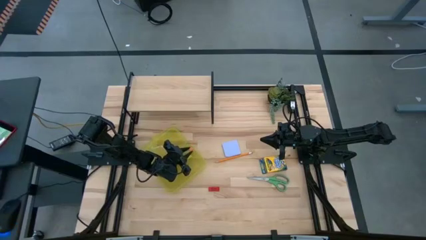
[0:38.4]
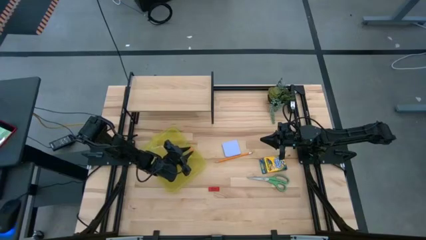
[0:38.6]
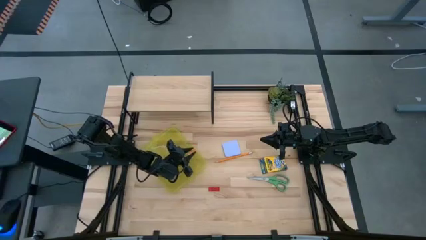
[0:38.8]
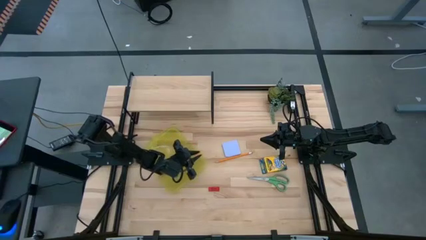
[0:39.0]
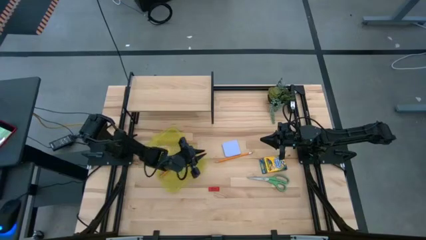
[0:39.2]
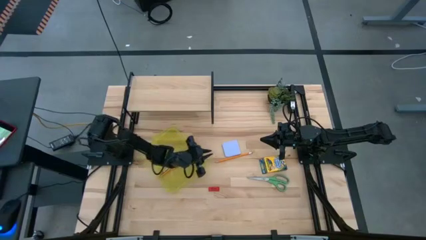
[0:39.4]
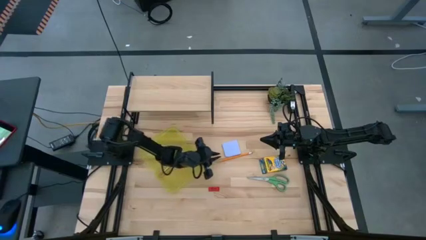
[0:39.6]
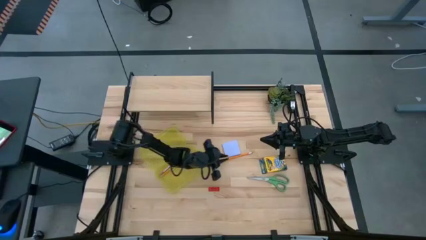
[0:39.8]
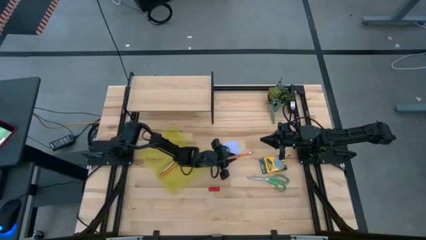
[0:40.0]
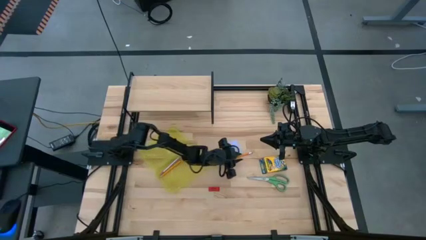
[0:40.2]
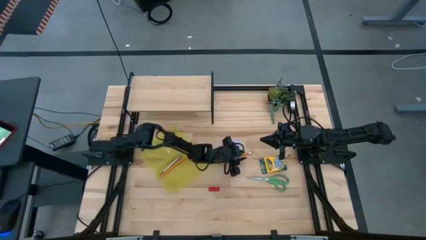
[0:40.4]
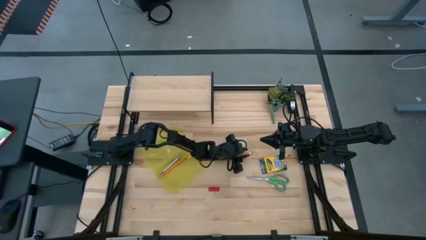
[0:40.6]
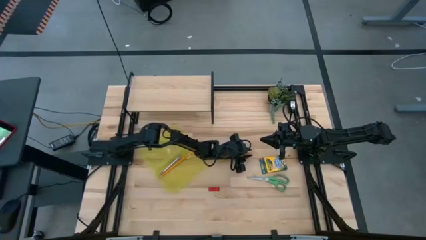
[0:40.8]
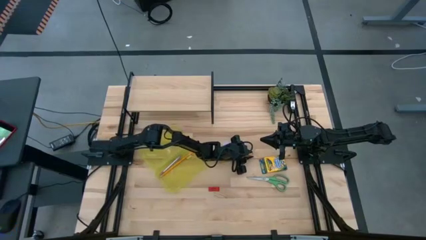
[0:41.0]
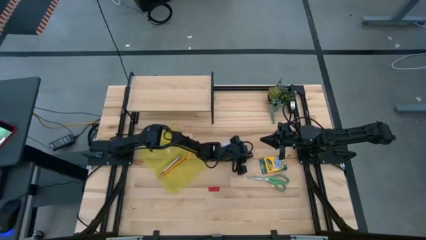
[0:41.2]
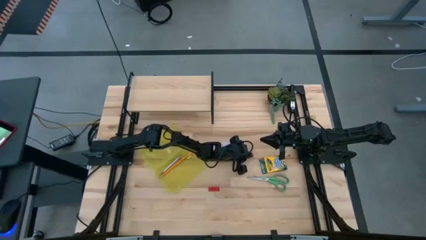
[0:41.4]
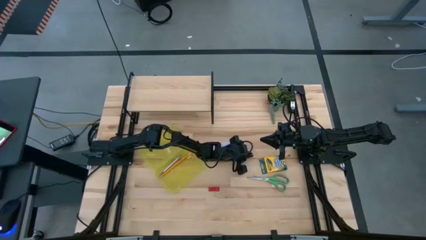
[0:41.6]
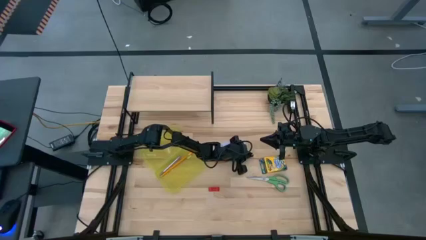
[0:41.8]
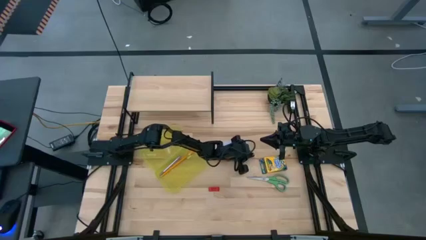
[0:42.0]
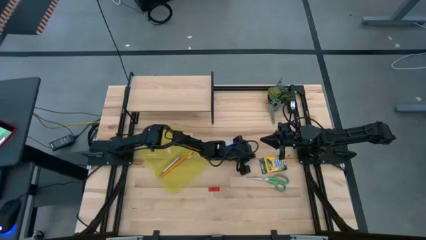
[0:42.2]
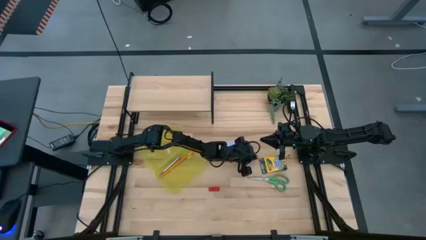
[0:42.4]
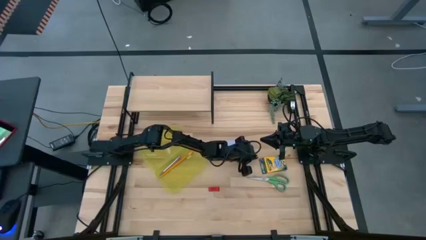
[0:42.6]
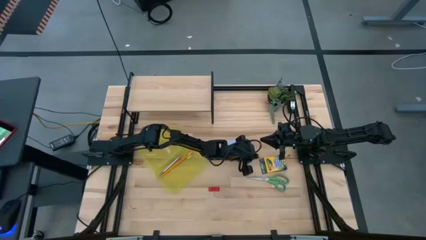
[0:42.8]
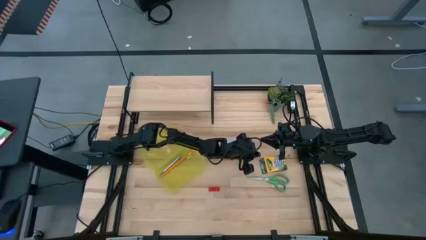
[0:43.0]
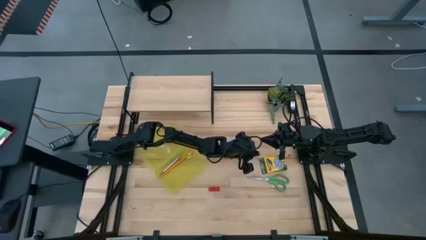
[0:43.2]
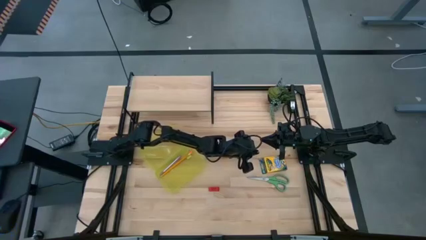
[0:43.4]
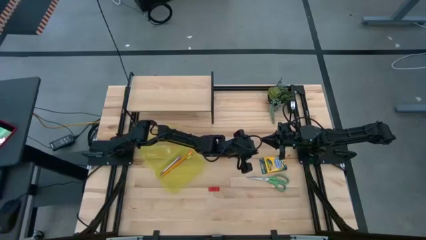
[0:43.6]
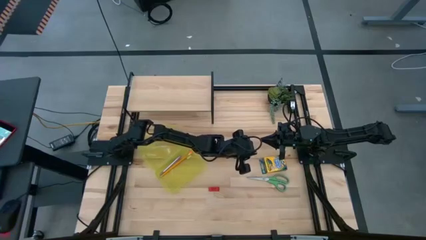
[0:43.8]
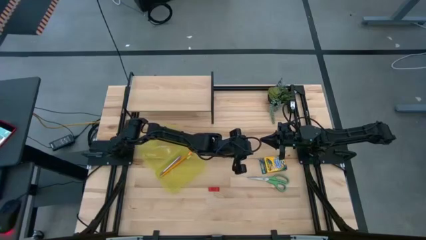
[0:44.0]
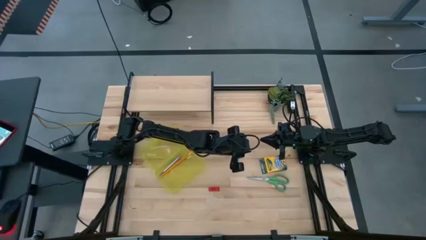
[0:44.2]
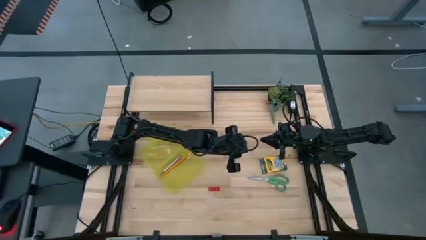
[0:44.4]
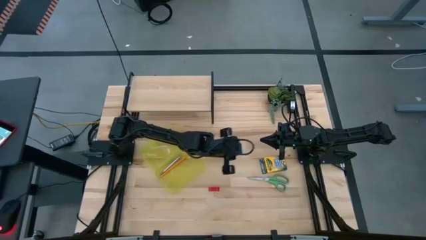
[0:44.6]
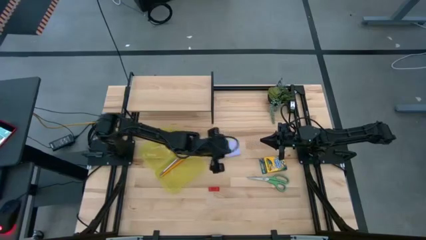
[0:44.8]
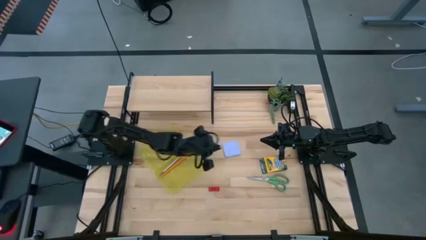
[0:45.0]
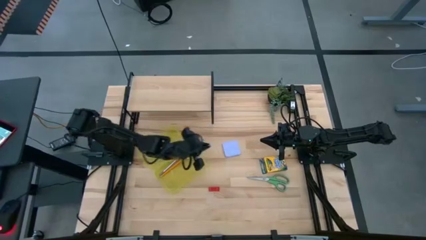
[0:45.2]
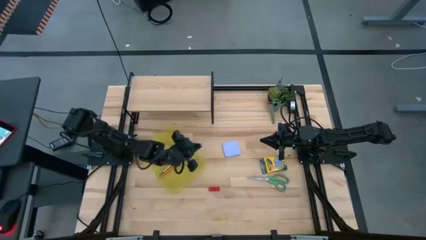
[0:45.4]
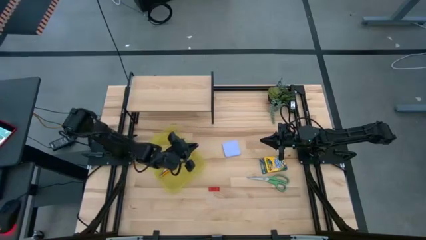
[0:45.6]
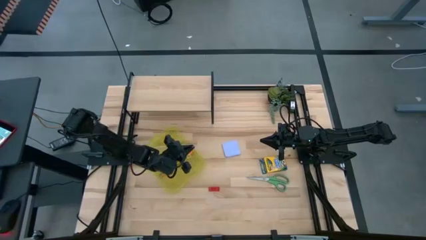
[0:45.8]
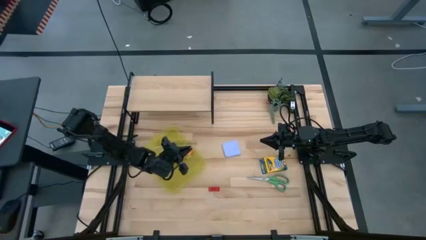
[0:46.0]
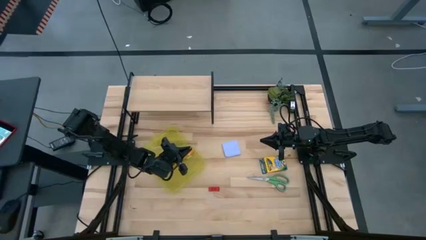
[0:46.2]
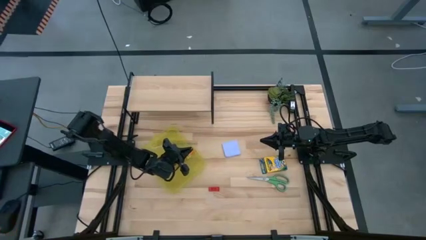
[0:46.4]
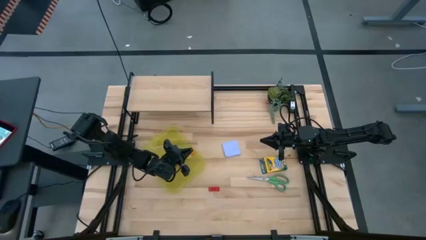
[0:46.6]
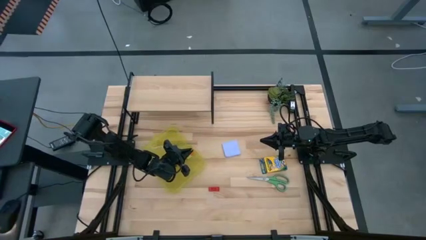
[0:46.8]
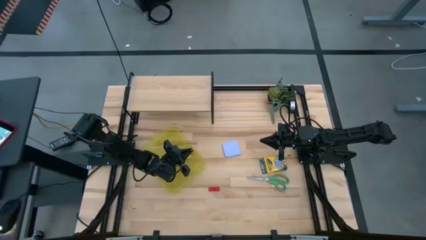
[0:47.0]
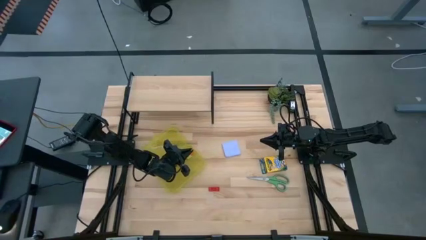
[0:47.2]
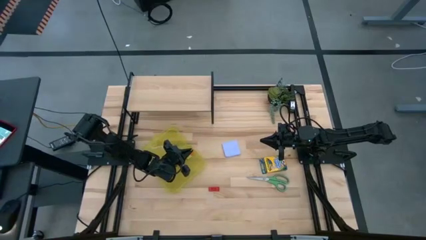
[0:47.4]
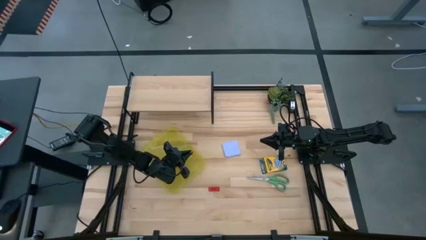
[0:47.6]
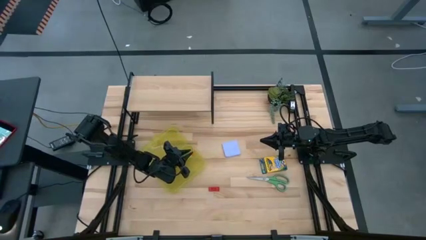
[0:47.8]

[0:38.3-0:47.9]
Task: Pack school essentials
Put the orange pencil into the yellow supply box

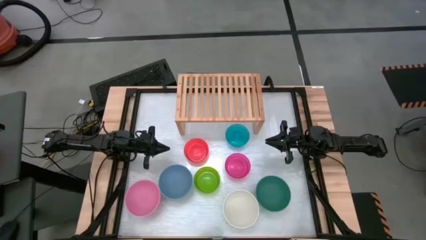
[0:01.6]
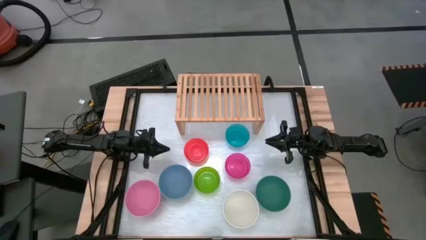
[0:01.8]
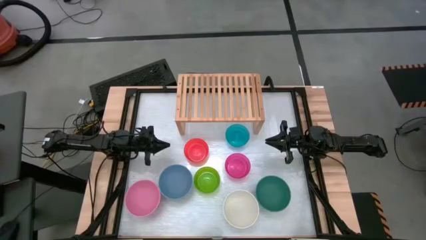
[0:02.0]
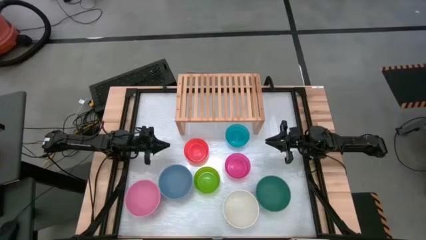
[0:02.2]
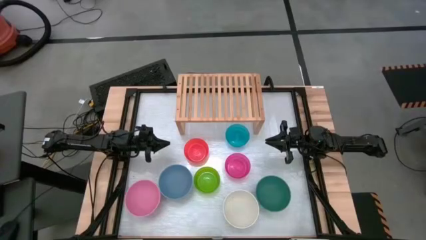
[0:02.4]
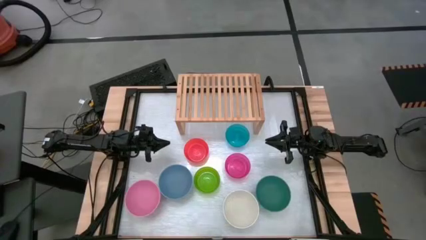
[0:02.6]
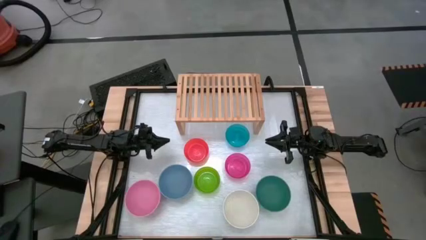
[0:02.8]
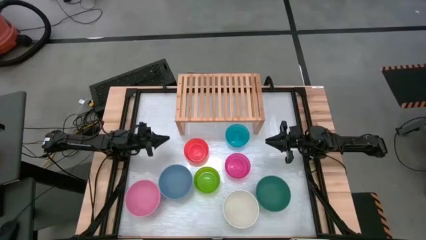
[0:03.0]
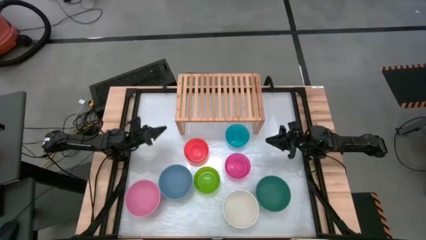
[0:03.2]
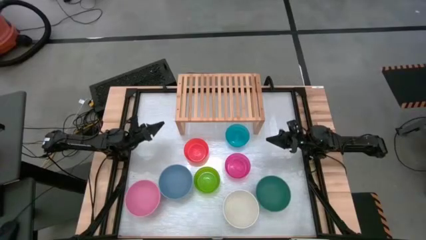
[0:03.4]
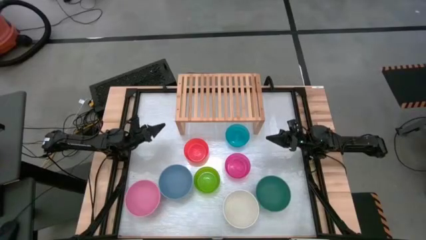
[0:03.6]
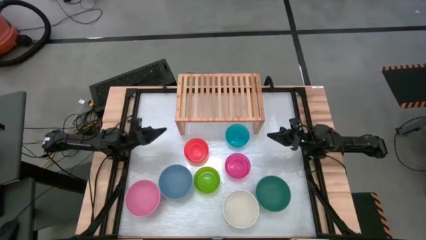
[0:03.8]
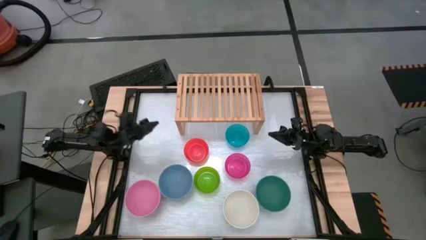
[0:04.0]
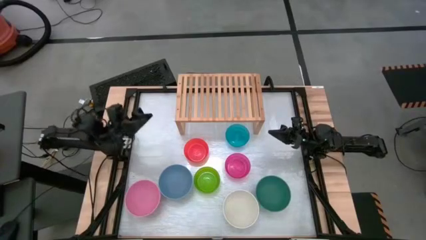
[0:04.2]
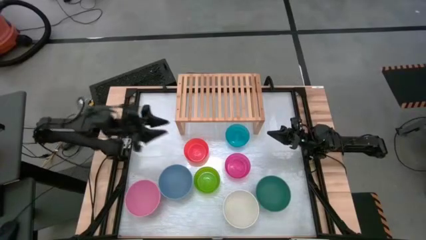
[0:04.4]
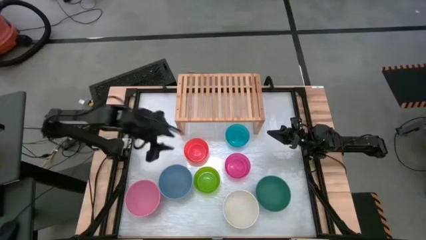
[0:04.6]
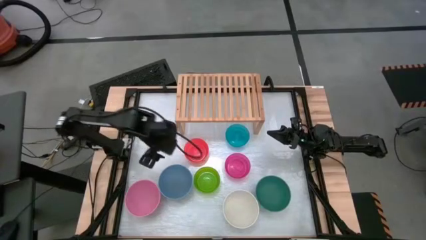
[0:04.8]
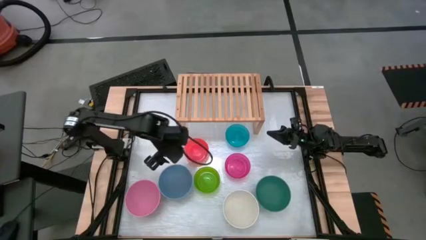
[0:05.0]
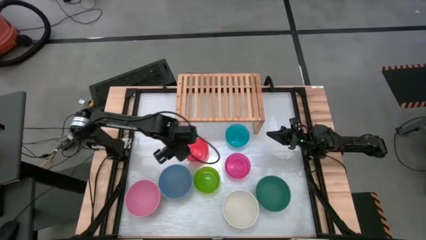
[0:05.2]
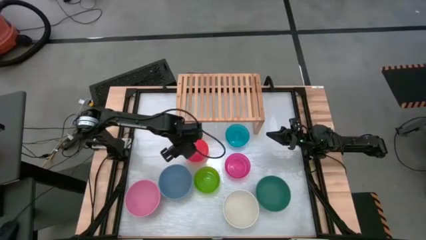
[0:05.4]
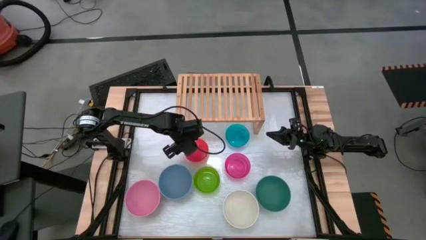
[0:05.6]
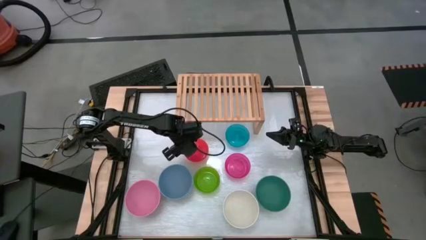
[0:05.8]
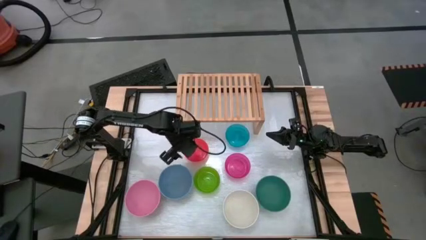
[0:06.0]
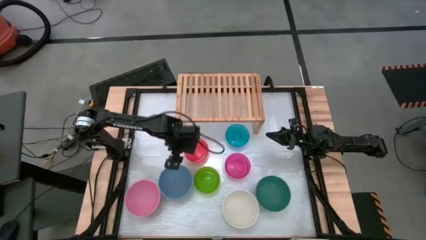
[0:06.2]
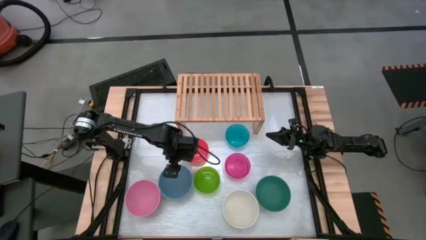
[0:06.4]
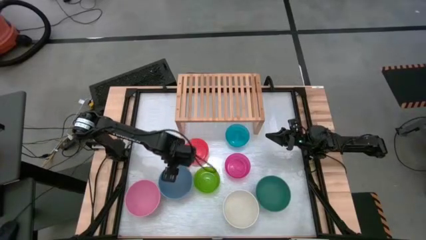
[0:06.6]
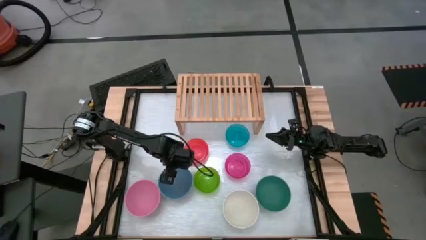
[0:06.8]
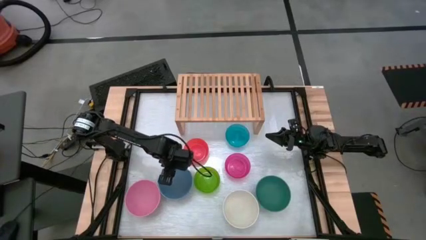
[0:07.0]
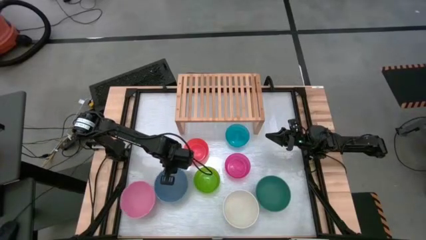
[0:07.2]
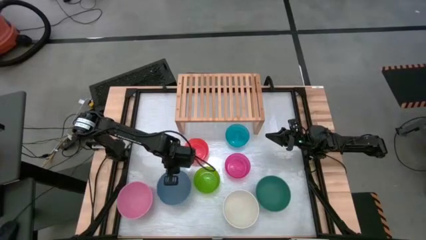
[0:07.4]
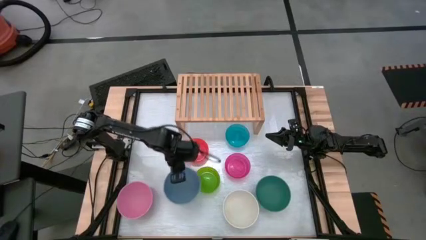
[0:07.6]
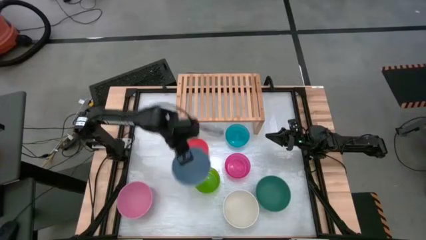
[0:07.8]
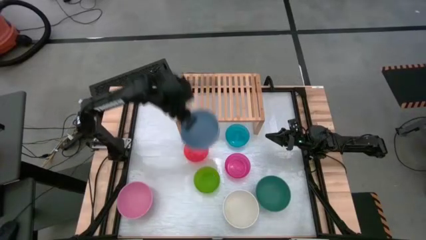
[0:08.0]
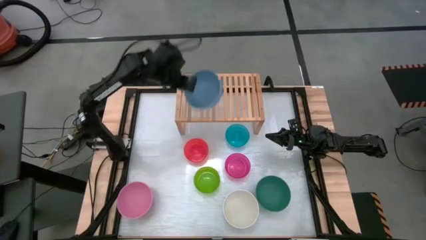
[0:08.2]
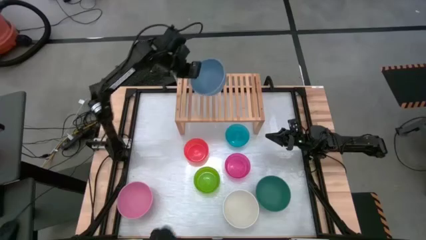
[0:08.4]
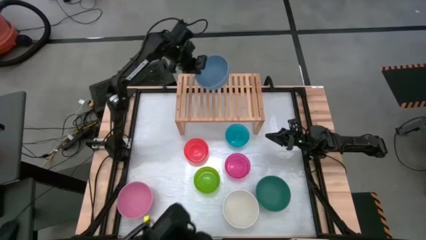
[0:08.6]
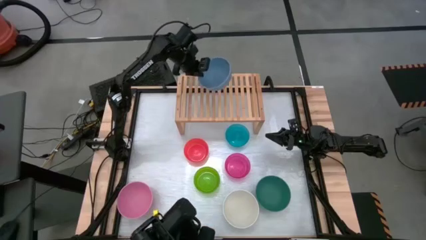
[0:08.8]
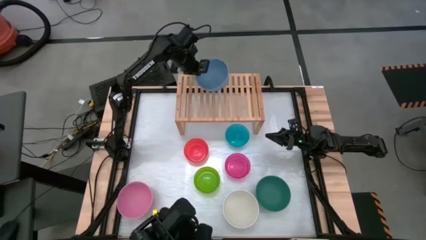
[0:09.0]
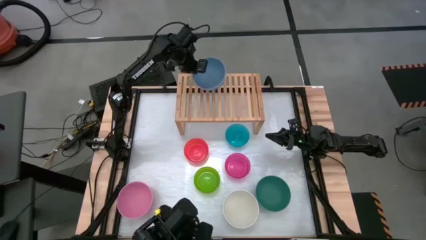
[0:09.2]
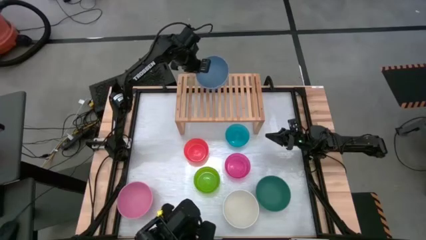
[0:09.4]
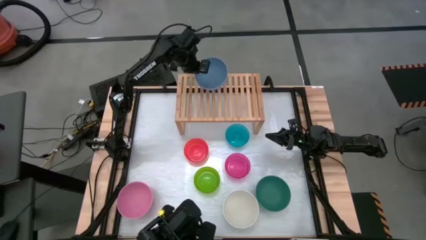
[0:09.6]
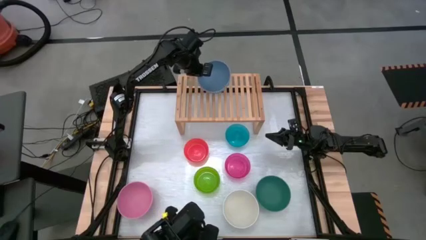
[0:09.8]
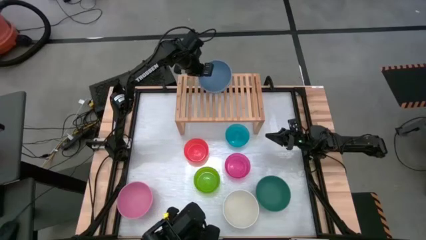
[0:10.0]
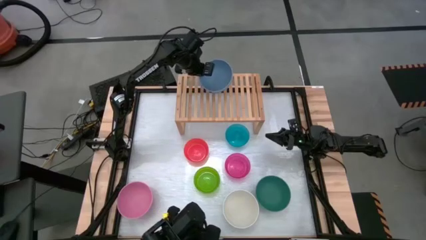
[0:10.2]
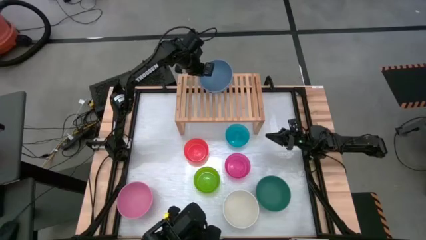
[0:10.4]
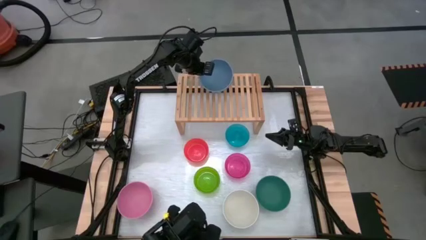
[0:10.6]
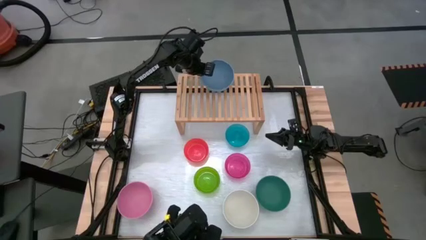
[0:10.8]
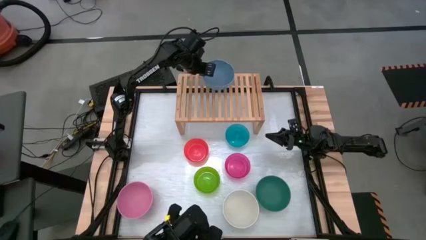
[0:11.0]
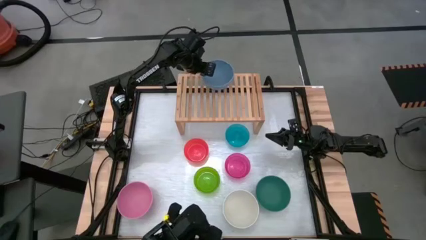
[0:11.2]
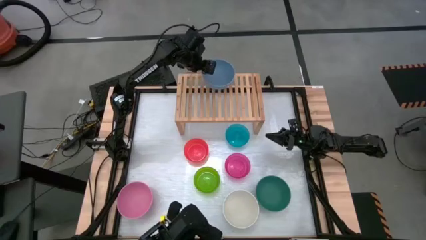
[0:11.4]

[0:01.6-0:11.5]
Task: Place and stack bowls onto a shelf
Put the left blue bowl on the shelf
